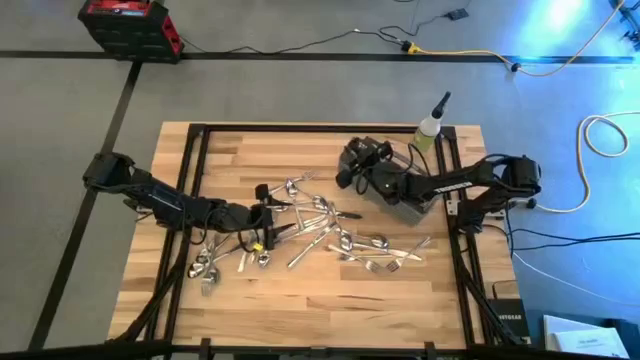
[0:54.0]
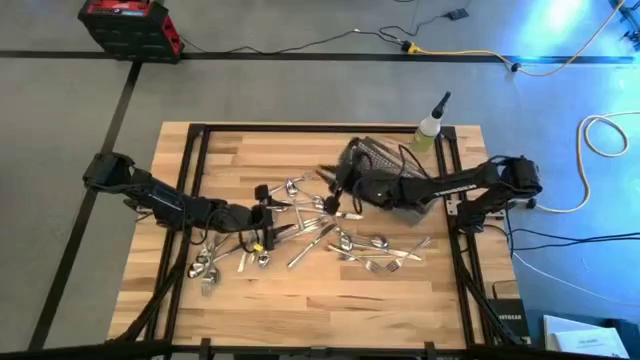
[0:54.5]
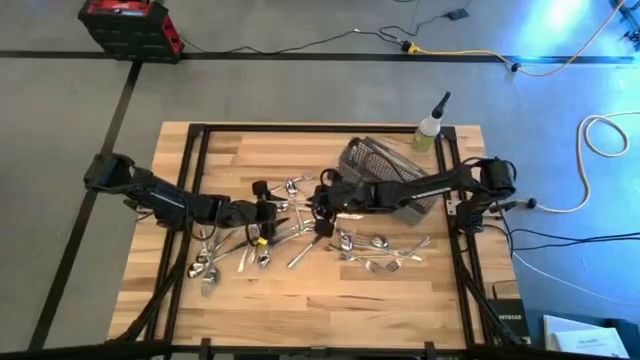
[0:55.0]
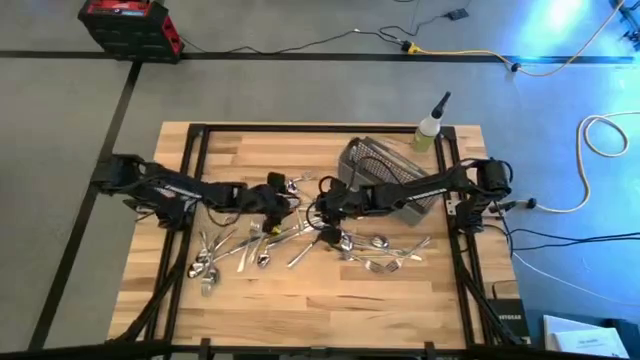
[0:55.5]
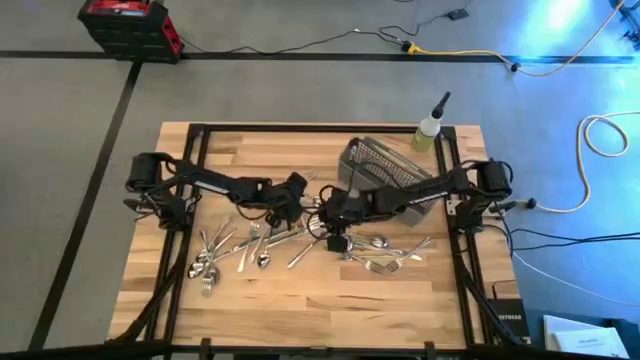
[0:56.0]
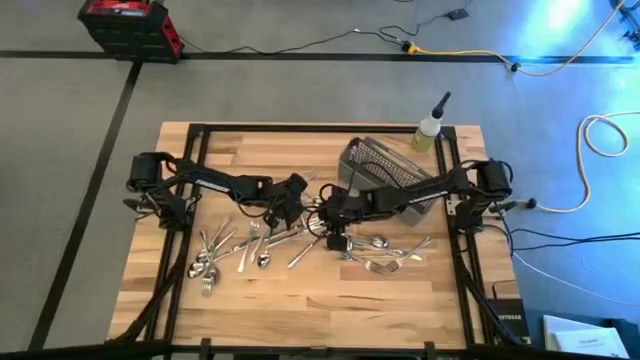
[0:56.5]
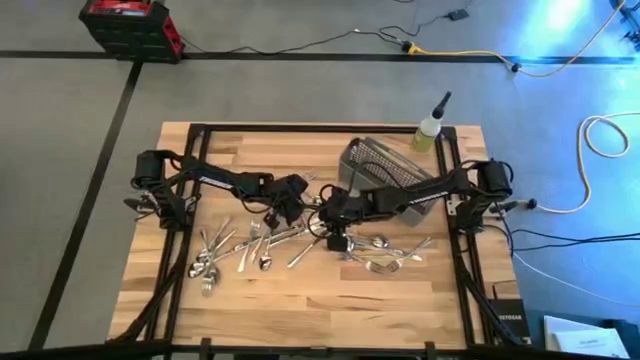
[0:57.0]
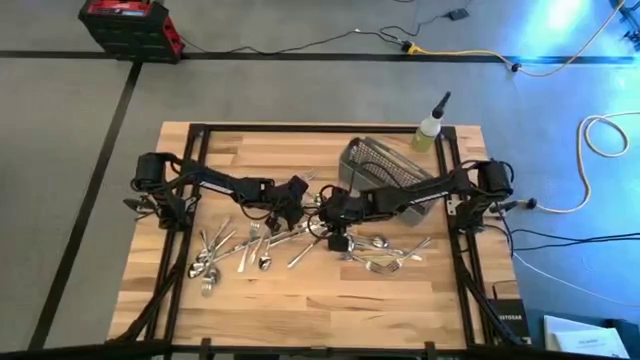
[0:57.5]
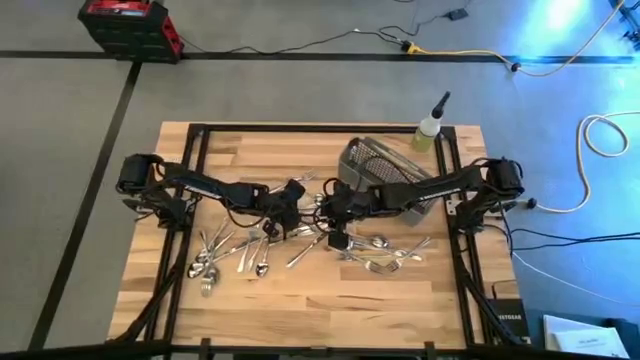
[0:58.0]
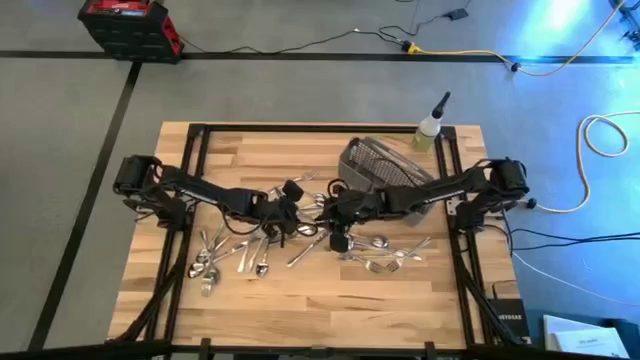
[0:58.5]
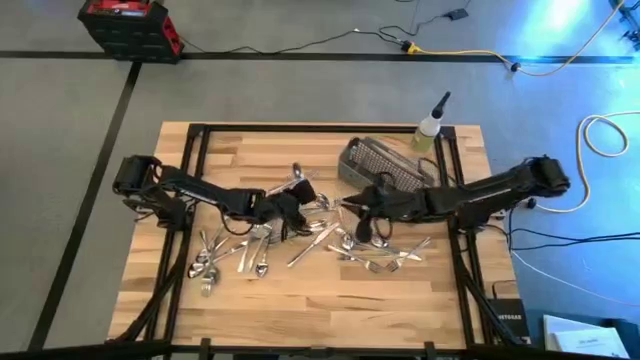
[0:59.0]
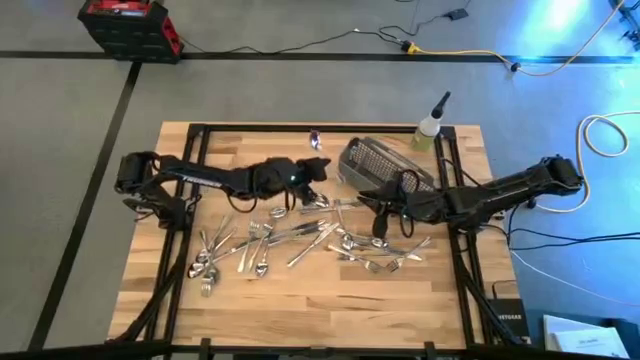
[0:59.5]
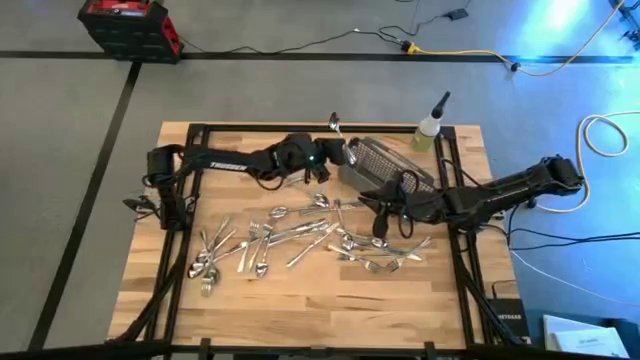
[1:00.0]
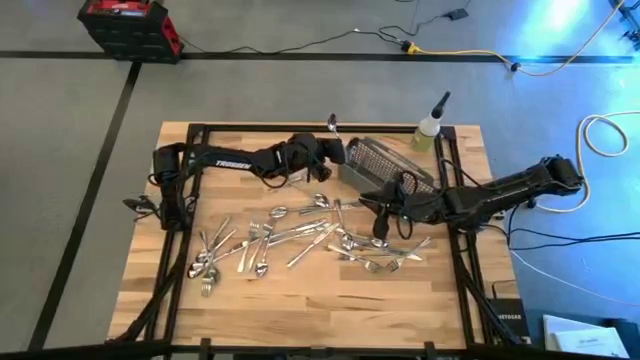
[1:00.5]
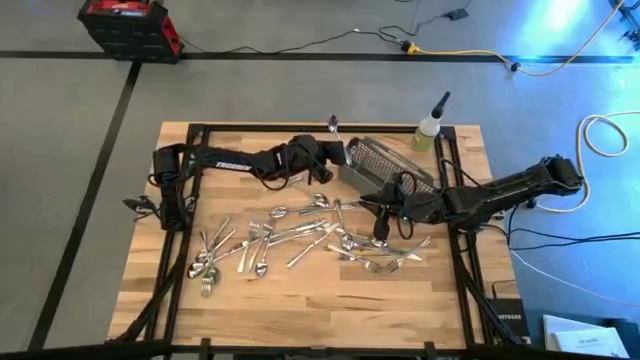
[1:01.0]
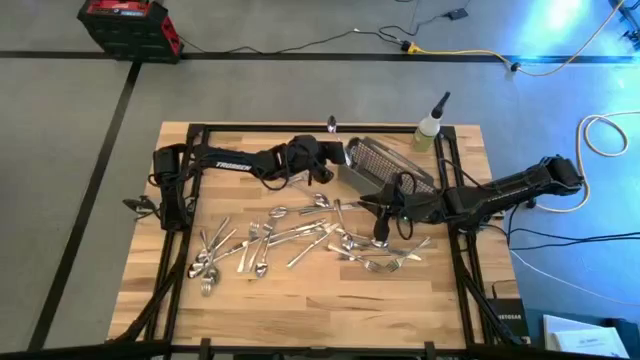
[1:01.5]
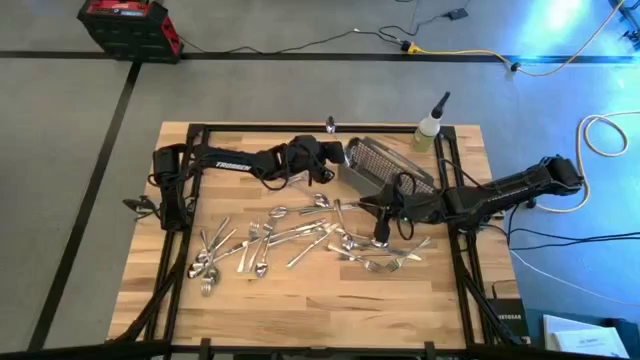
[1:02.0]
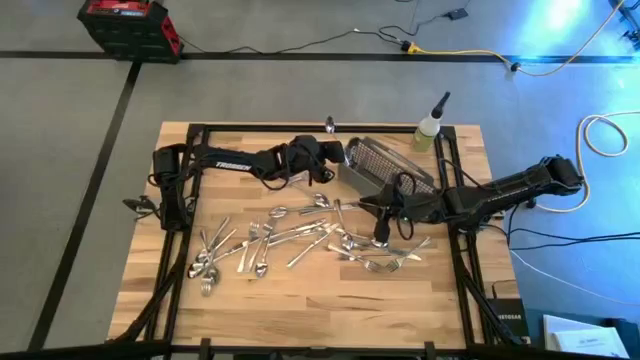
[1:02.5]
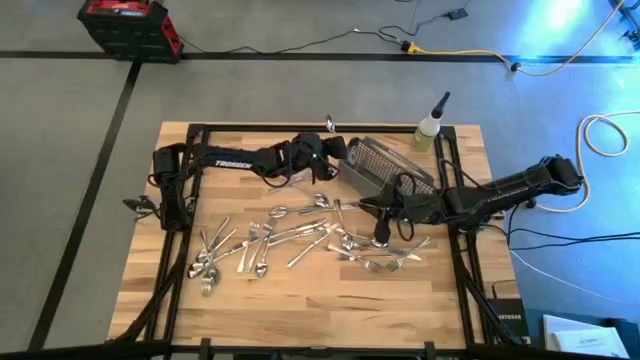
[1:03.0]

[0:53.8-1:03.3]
Task: Sort silverware
Put the silver spoon into the gray silverware organizer

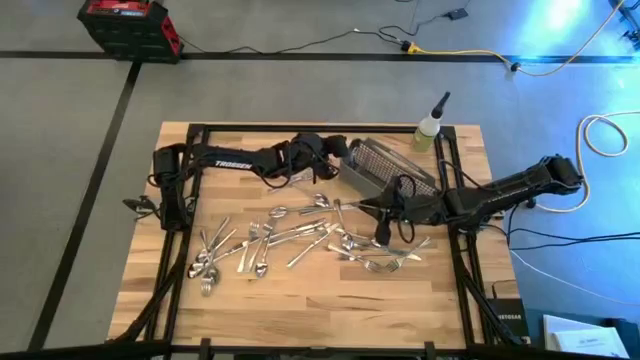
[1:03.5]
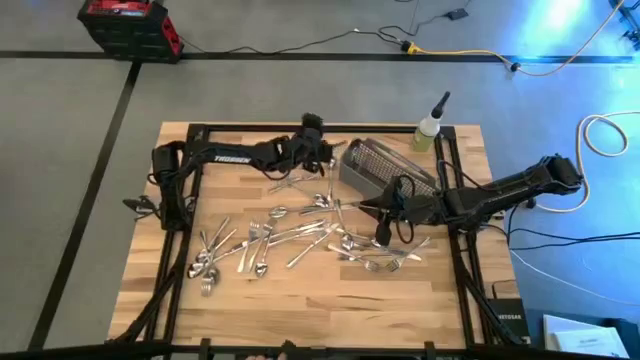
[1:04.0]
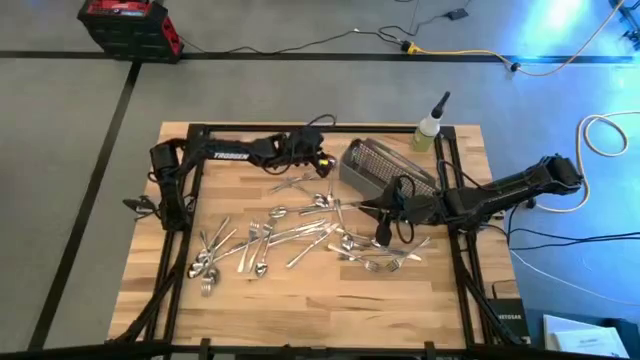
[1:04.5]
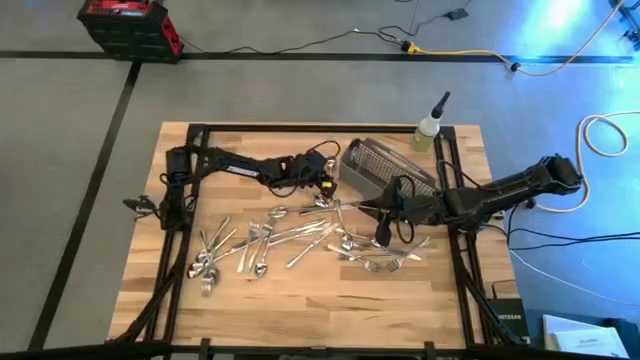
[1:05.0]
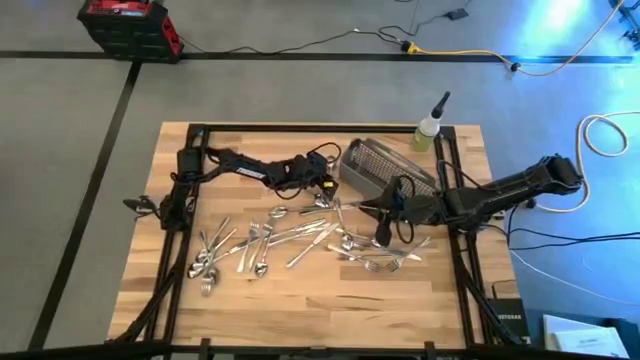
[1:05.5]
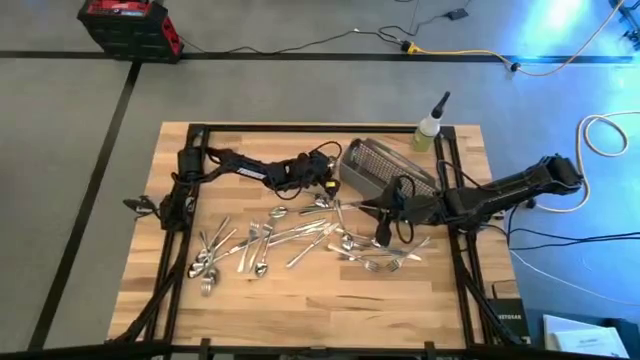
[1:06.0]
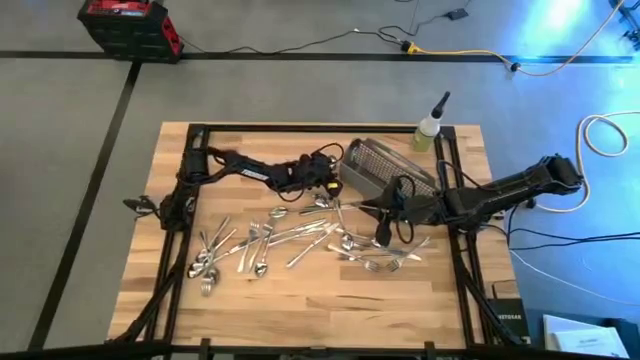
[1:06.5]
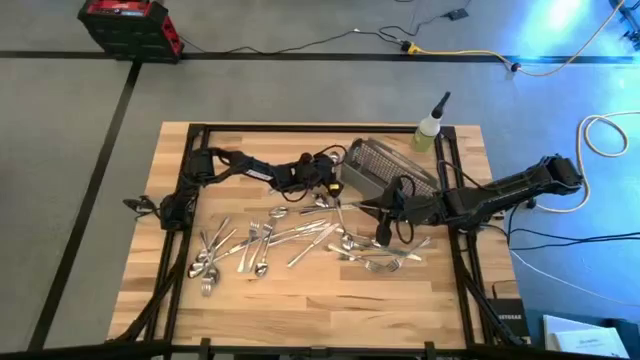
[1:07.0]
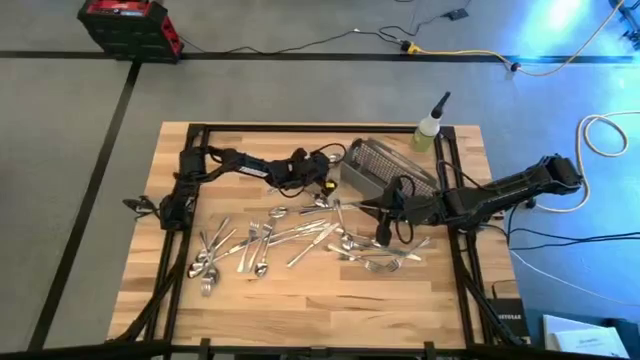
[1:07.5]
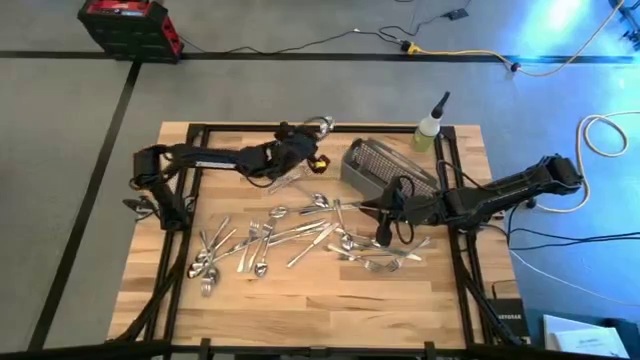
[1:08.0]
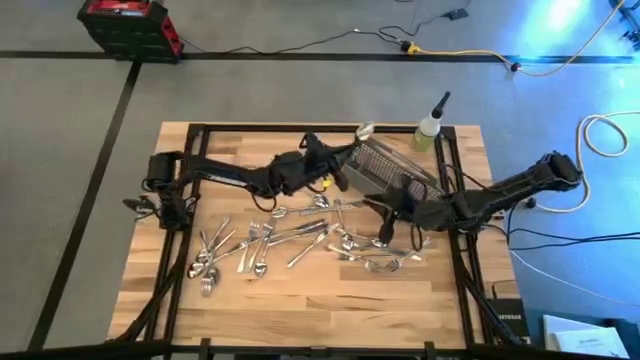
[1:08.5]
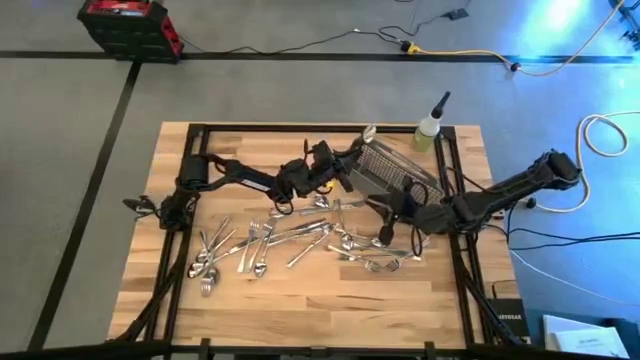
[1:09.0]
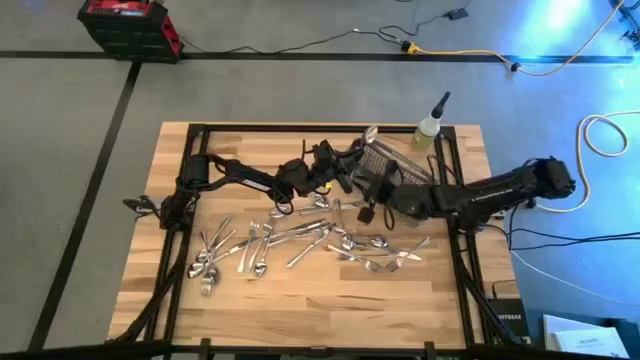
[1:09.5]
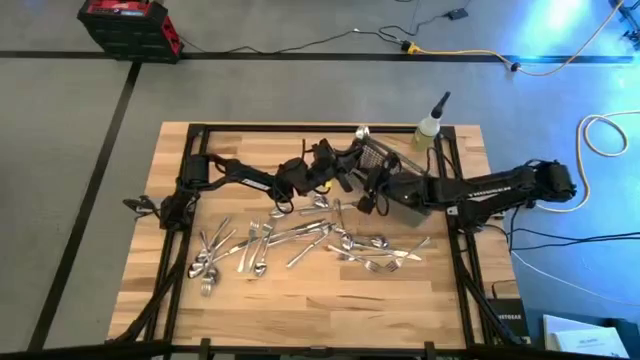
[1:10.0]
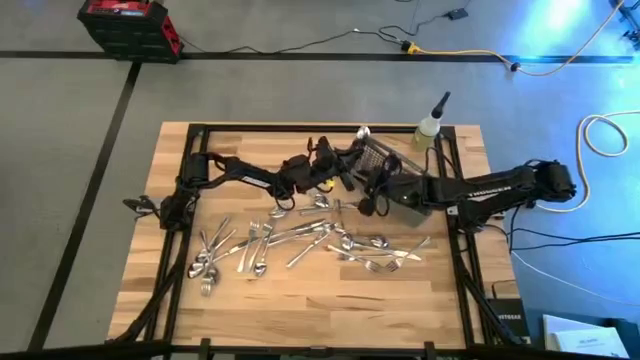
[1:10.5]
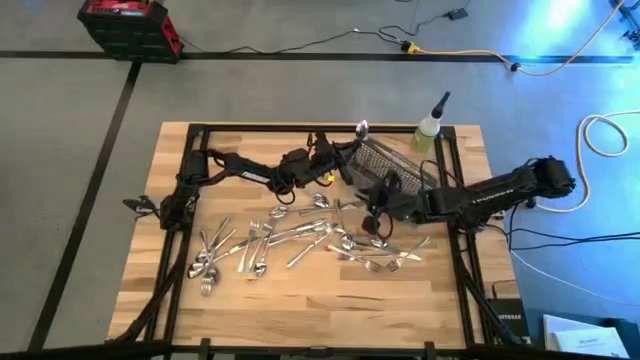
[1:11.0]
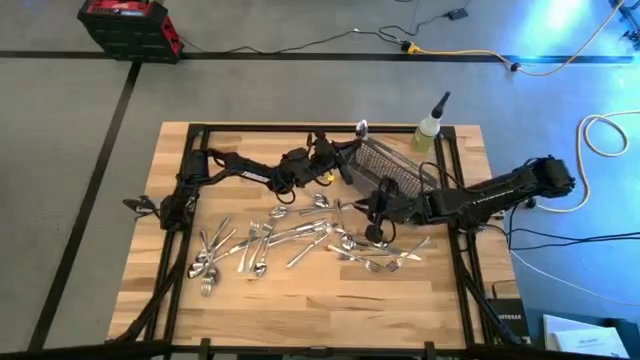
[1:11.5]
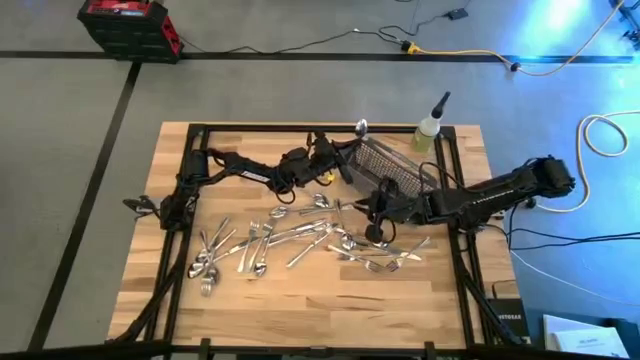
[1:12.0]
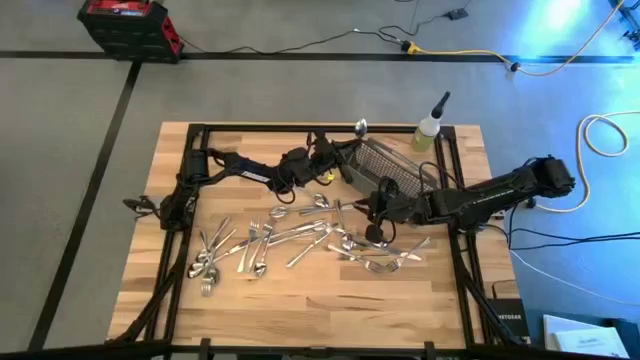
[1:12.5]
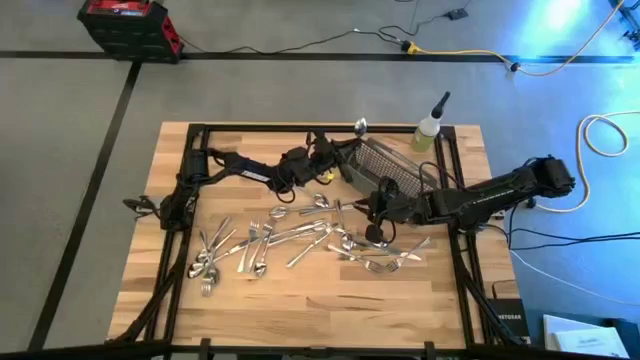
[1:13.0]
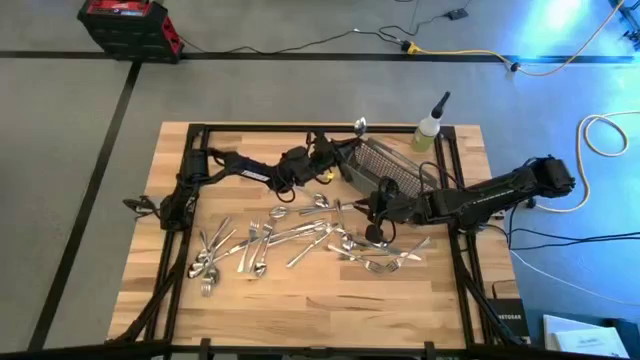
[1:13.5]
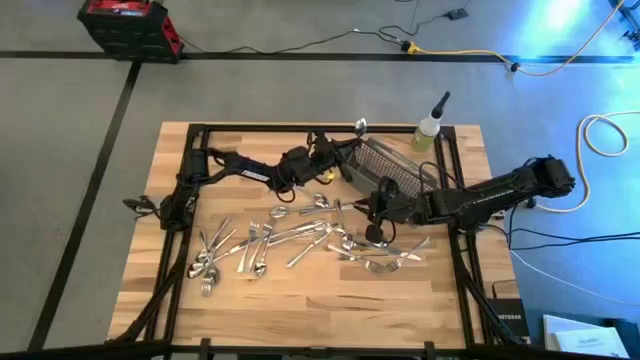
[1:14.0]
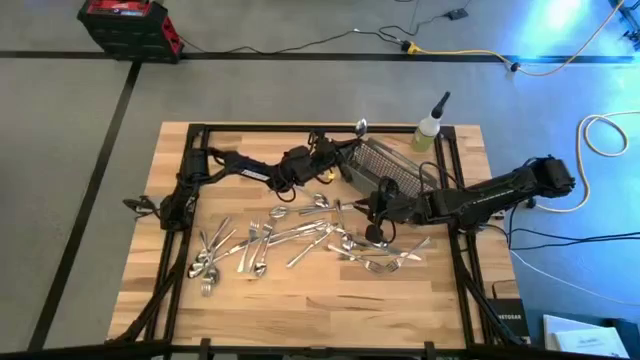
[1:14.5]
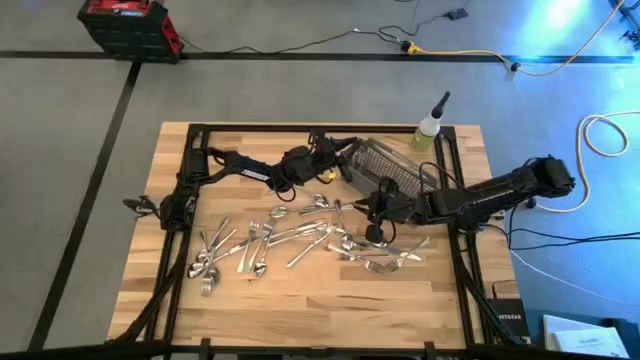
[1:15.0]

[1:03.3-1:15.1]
Put the silver spoon into the gray silverware organizer
